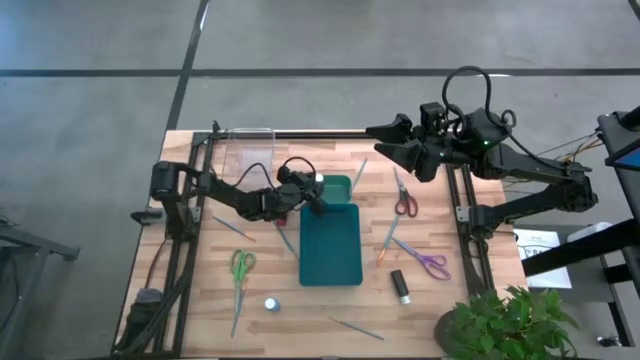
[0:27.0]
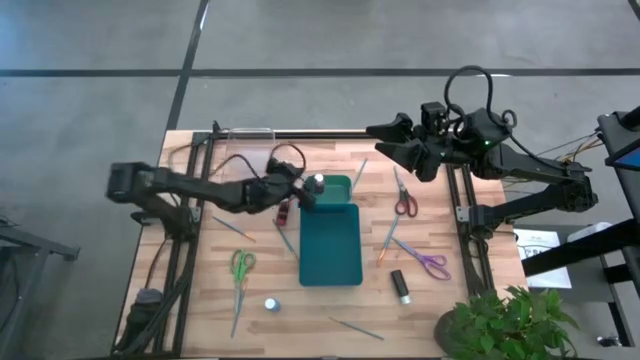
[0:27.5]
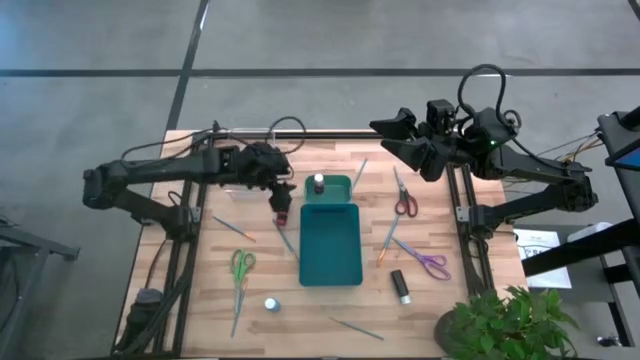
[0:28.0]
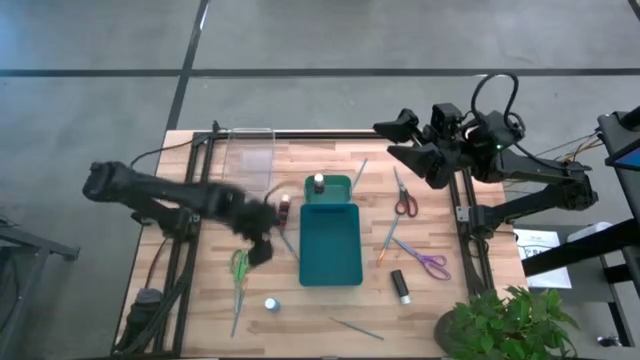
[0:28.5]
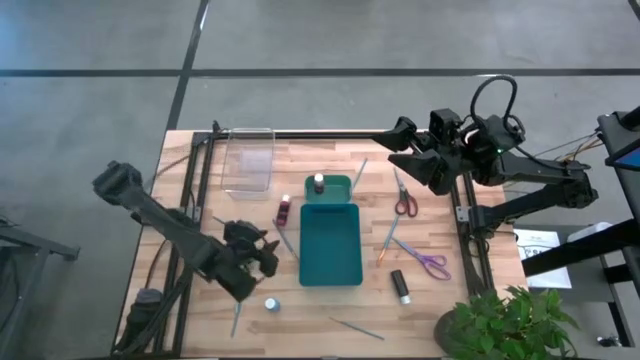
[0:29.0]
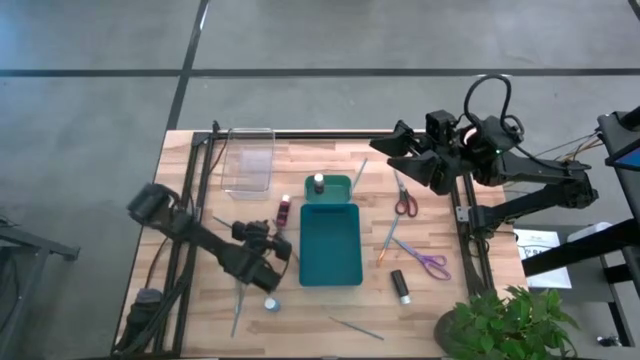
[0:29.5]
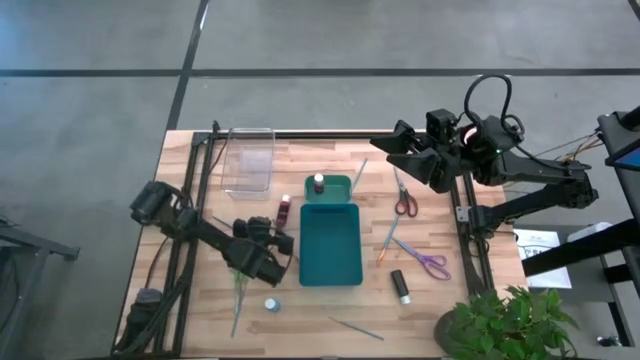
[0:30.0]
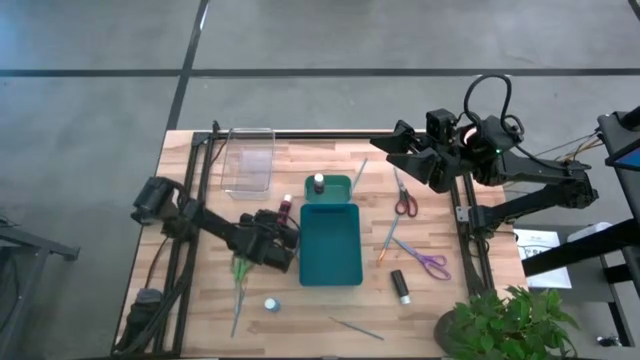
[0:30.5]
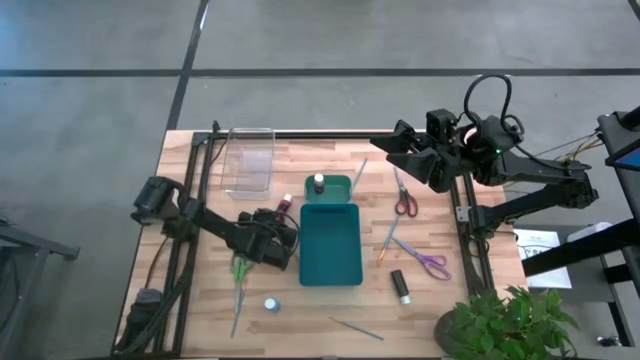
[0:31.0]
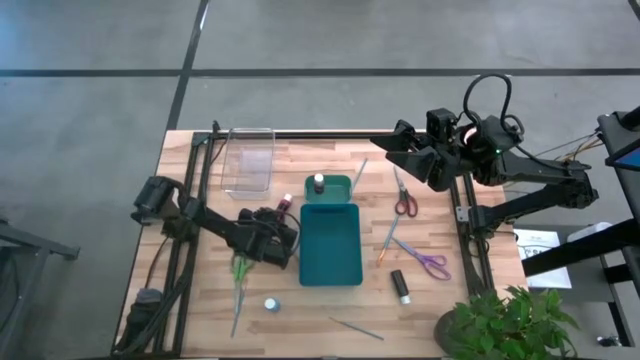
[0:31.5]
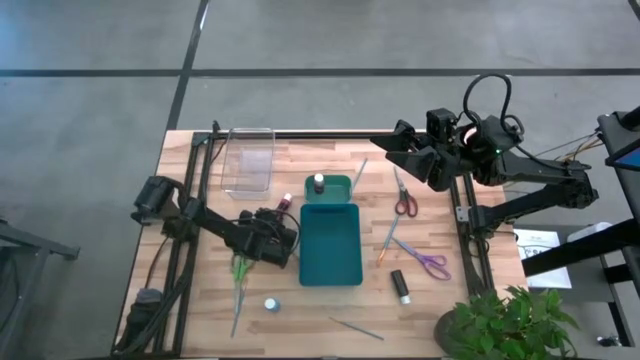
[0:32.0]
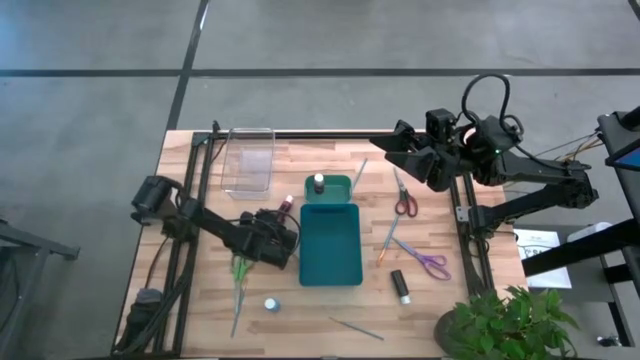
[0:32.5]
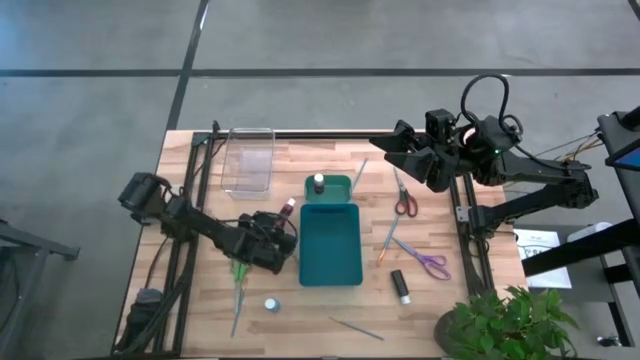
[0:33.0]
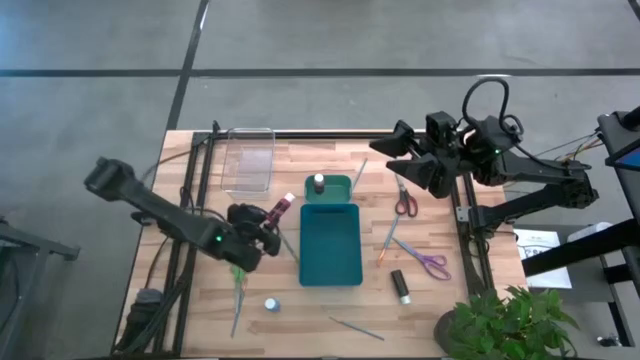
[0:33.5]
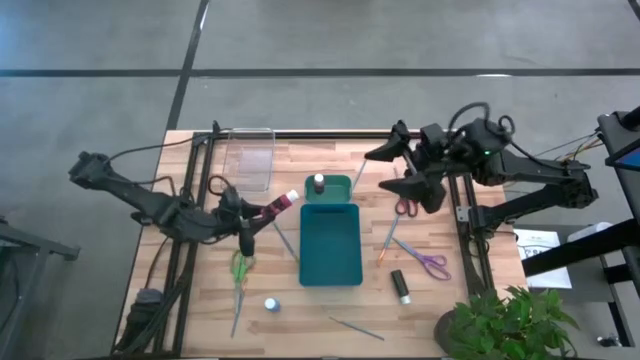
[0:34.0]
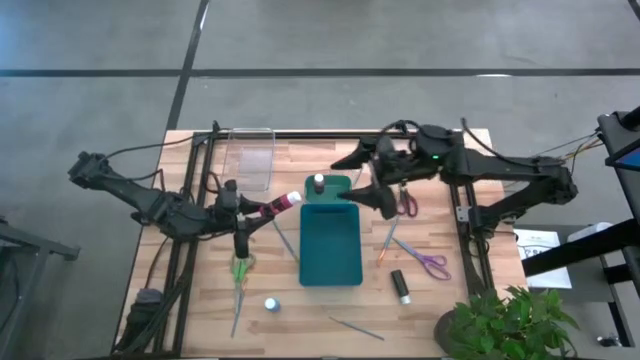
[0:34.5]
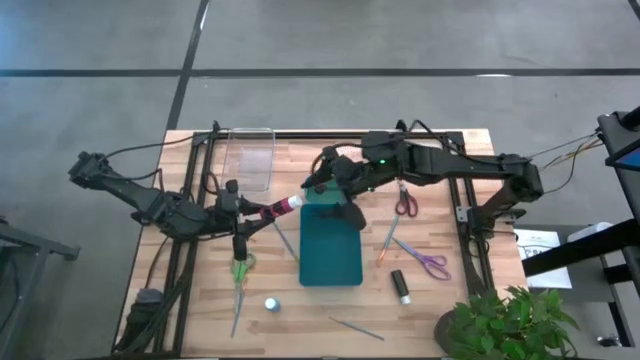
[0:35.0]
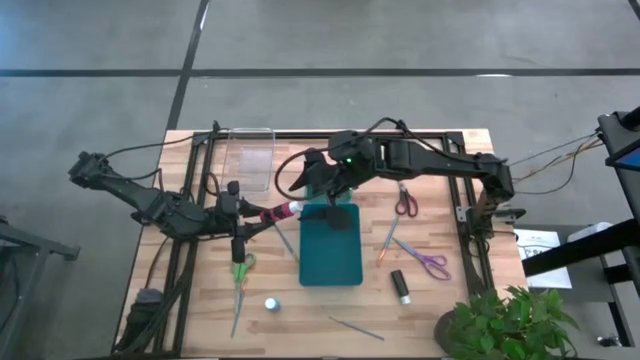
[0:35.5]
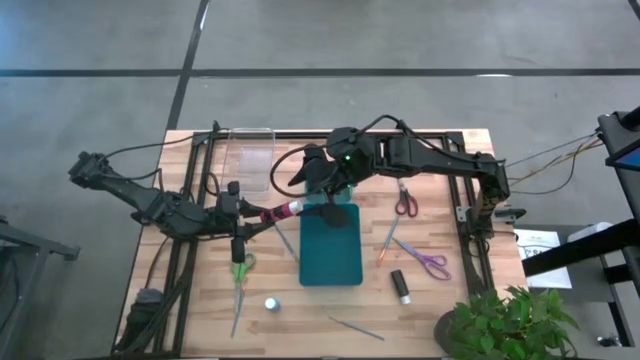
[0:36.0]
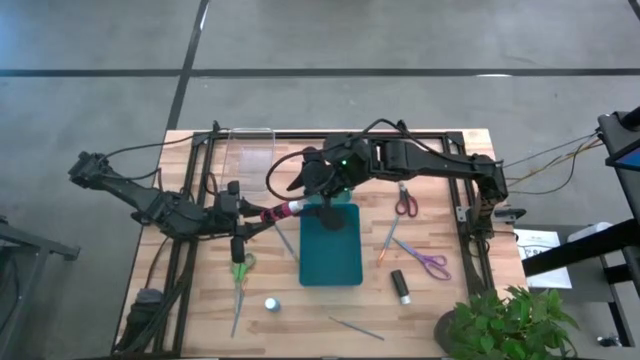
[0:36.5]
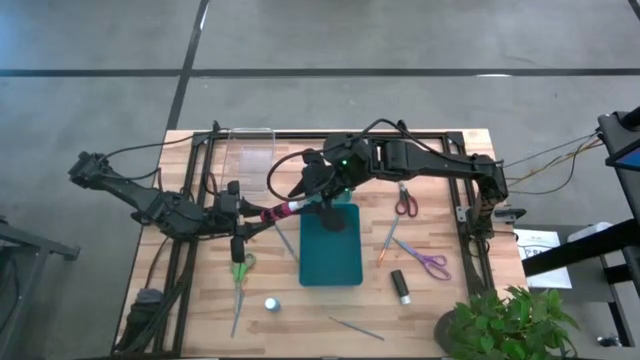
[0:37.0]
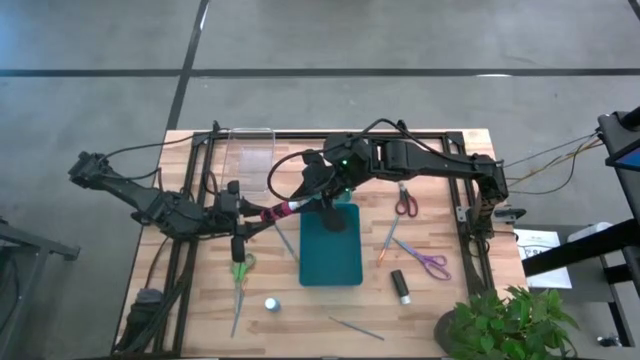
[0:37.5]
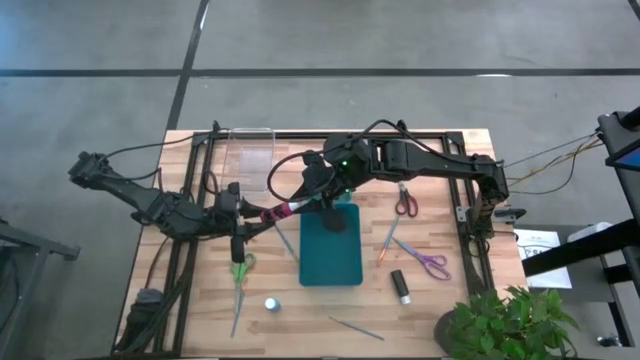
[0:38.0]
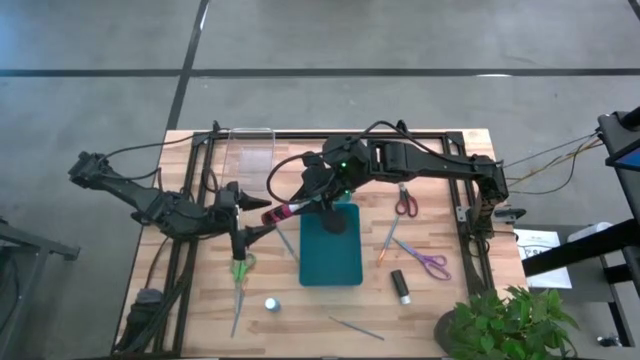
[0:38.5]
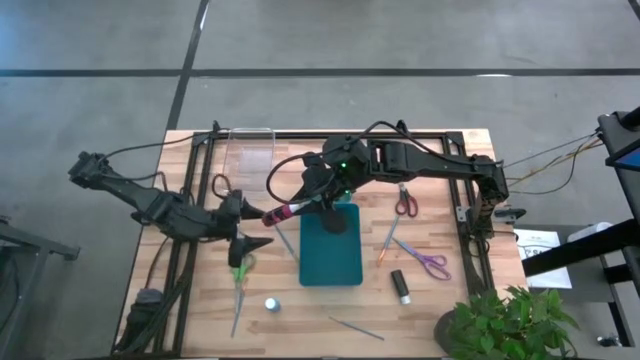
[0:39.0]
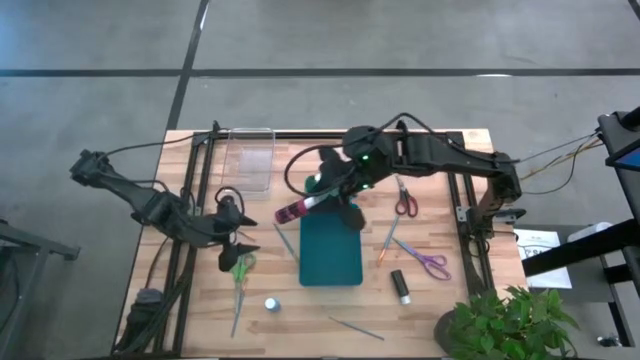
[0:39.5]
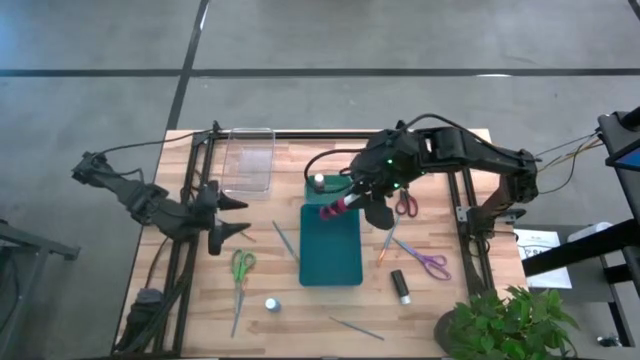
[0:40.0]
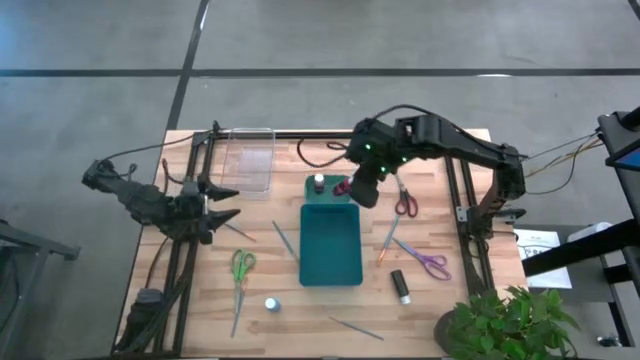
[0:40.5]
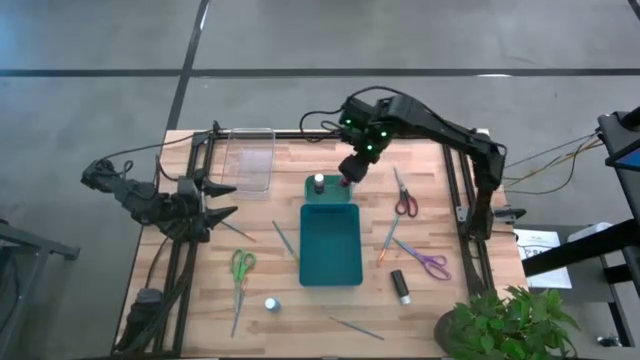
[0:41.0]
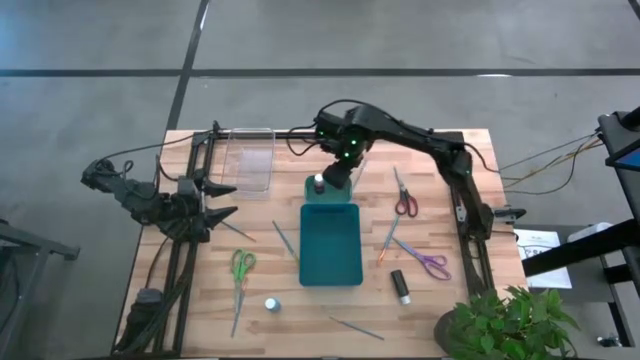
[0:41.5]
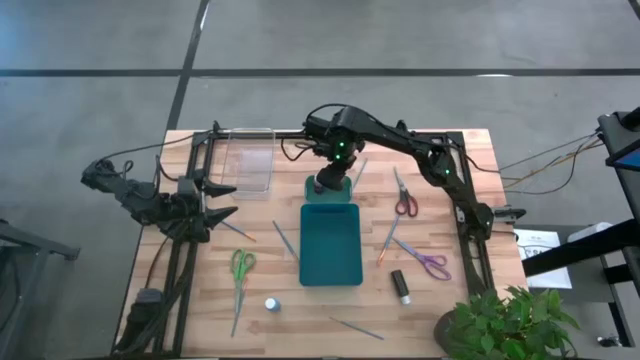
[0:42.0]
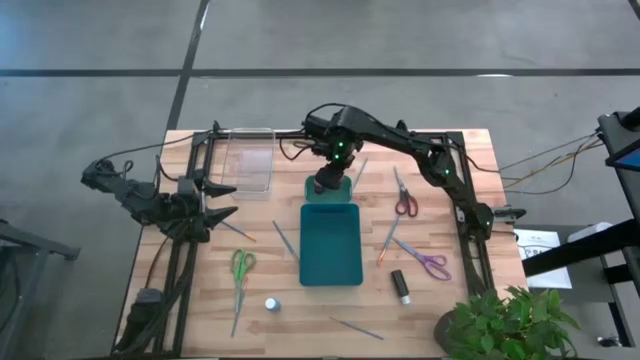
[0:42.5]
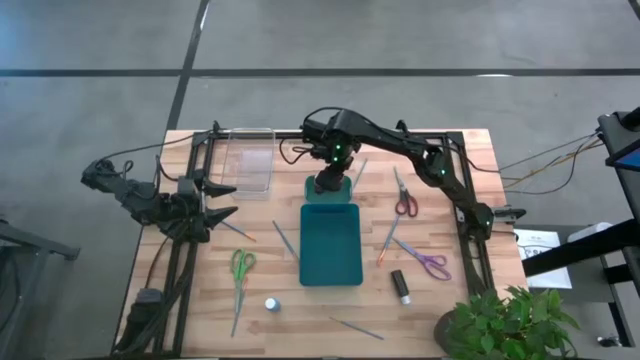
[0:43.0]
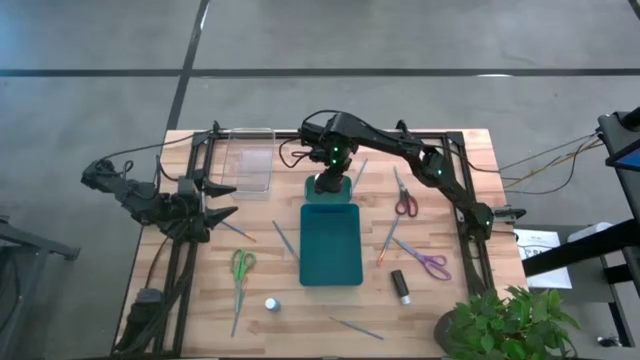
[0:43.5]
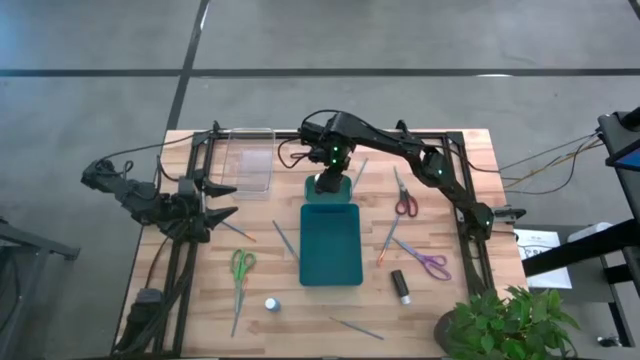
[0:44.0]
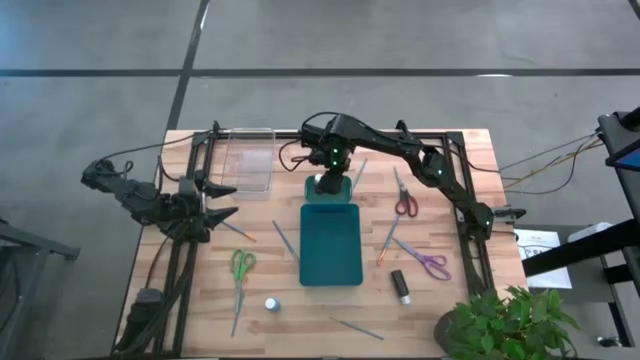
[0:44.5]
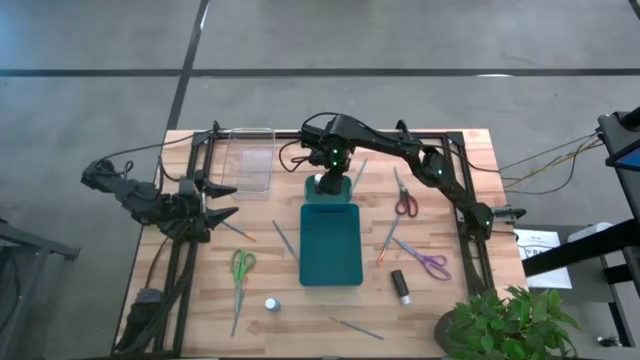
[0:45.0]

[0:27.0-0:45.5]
Task: Pick & Place Paint Supplies
Put the red paint bottle into the green bin

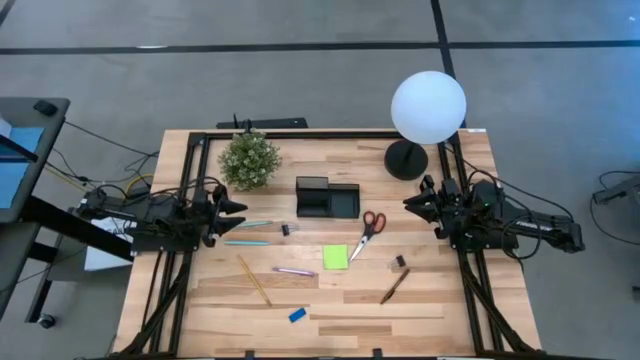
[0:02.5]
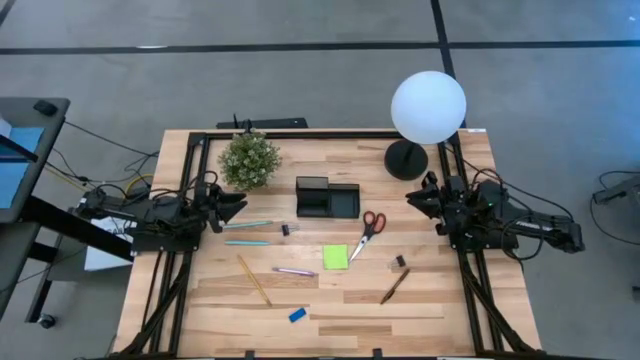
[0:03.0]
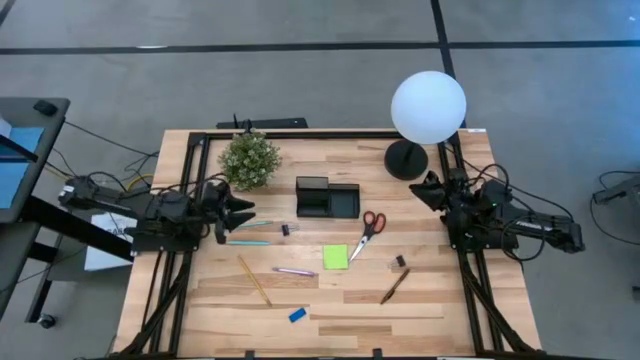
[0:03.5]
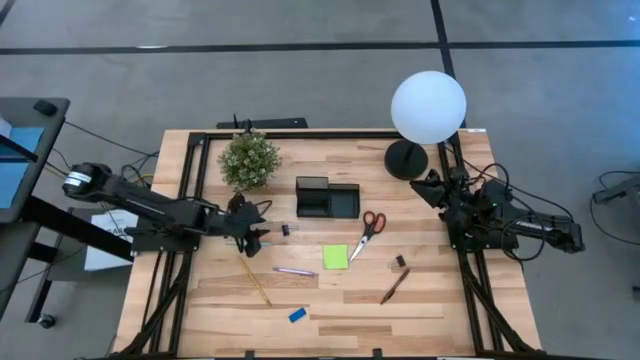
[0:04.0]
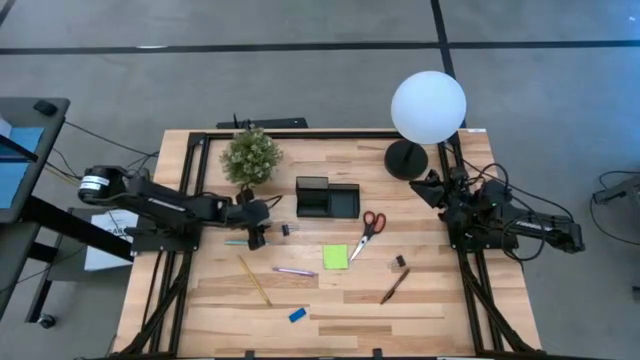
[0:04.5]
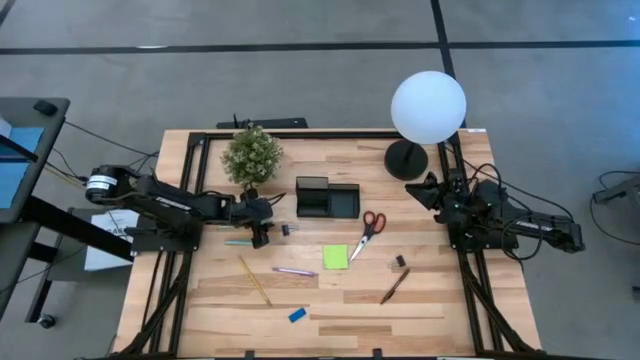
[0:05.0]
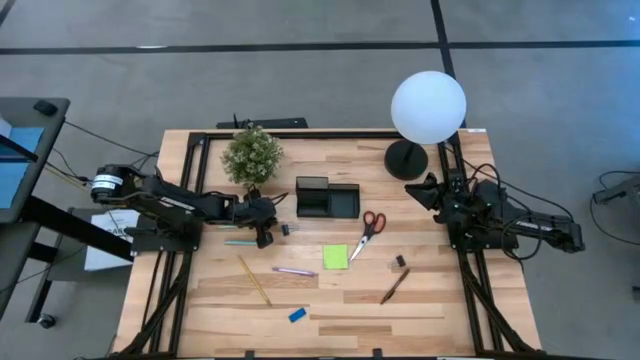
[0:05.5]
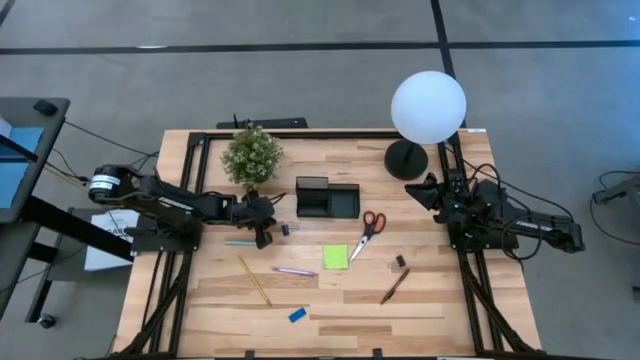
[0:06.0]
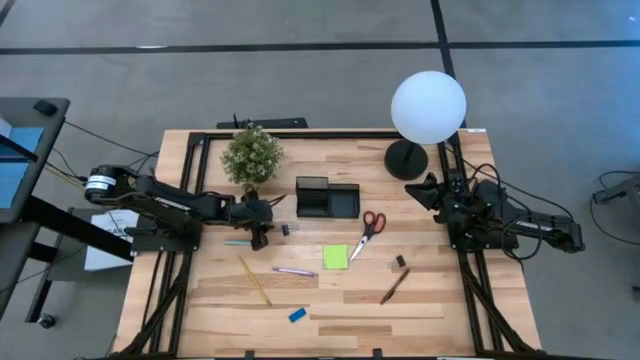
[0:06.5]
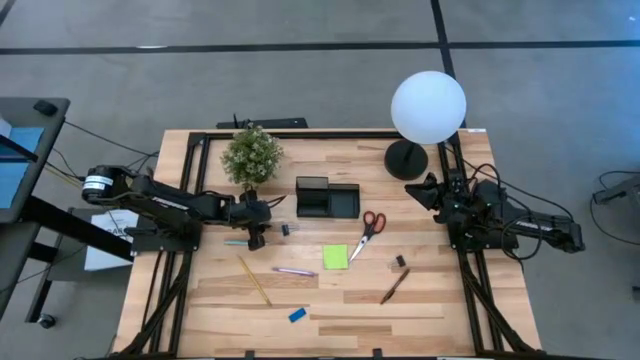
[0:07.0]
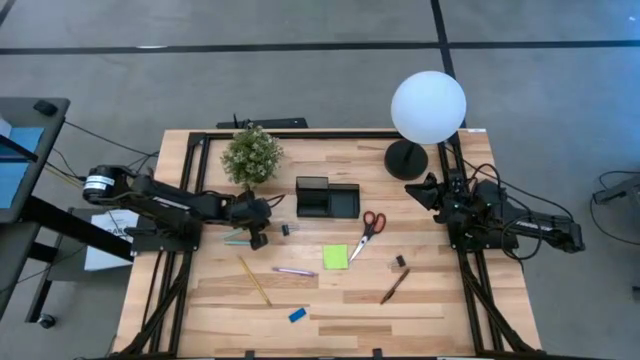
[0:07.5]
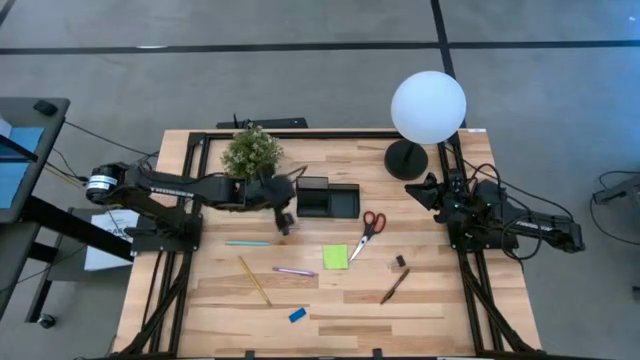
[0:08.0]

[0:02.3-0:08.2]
Task: Pick and place office supplies into organizer
Put the blue pencil into the black desk organizer
